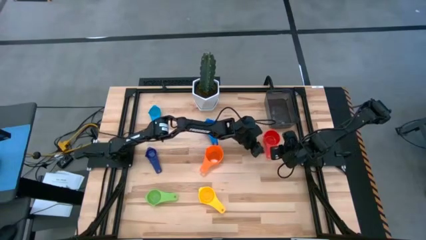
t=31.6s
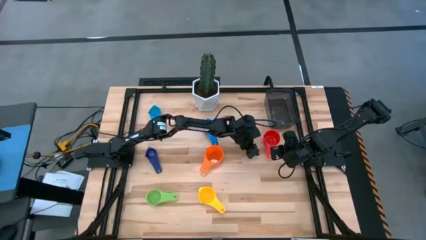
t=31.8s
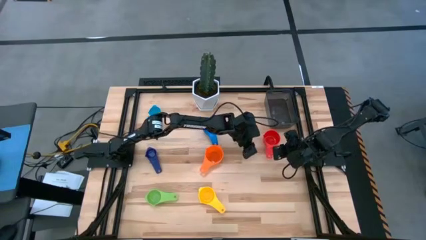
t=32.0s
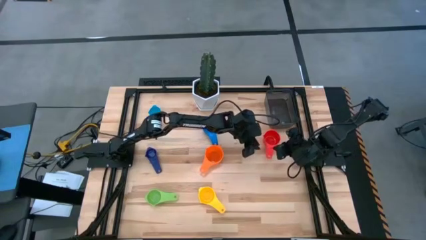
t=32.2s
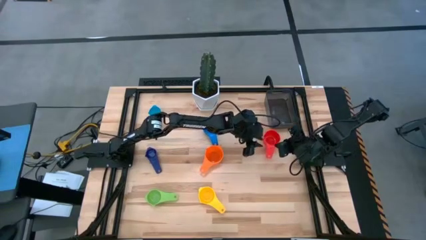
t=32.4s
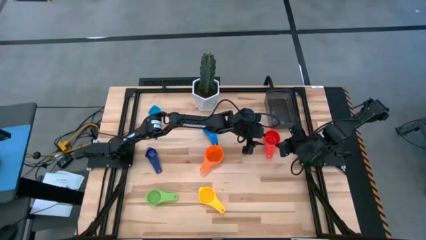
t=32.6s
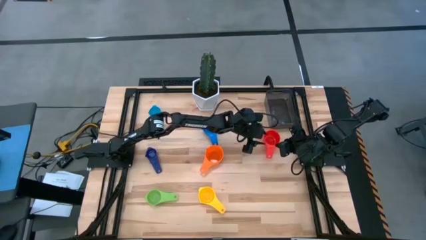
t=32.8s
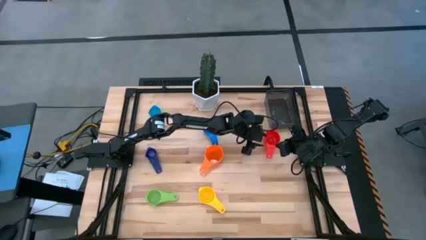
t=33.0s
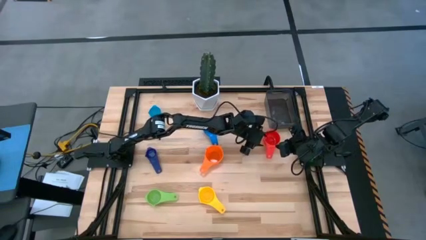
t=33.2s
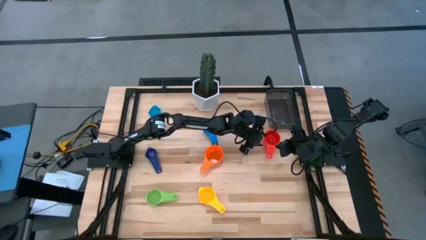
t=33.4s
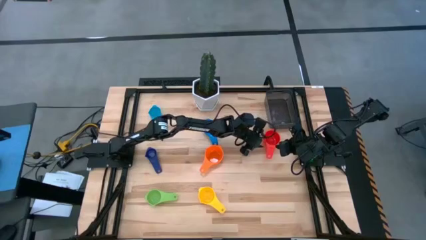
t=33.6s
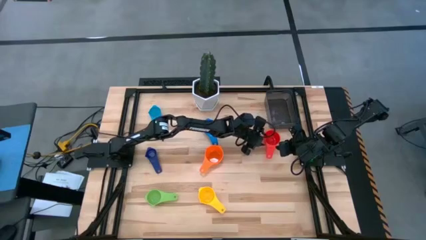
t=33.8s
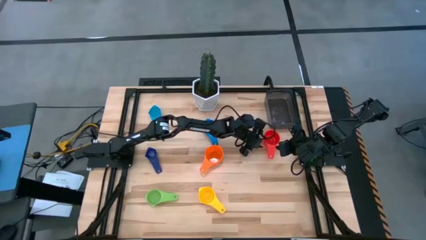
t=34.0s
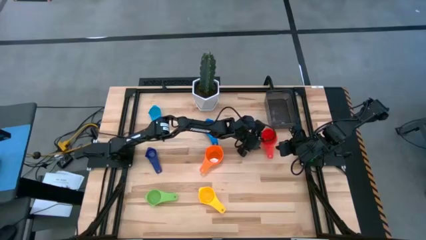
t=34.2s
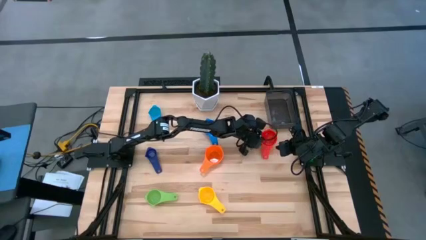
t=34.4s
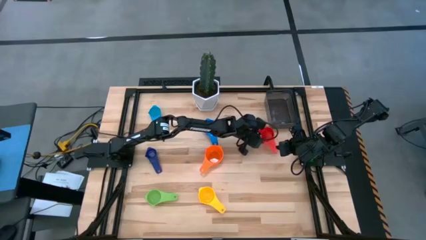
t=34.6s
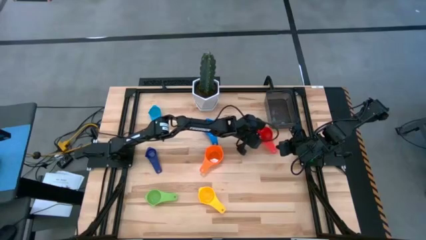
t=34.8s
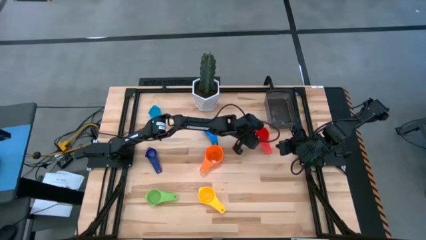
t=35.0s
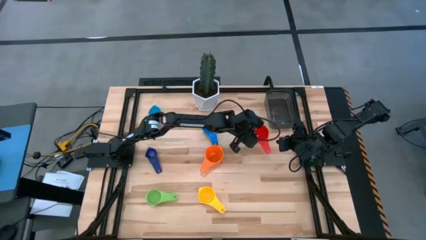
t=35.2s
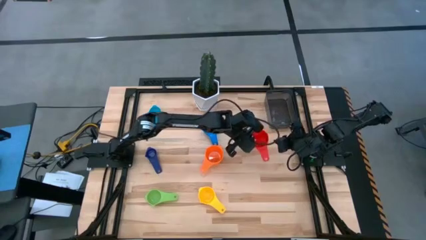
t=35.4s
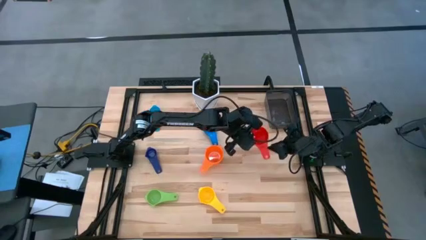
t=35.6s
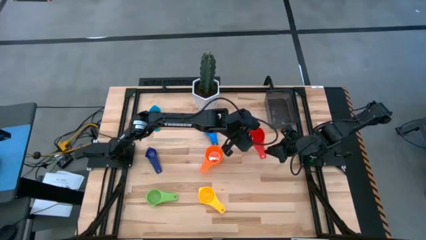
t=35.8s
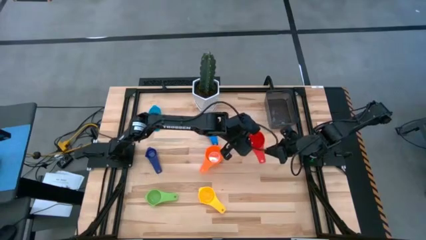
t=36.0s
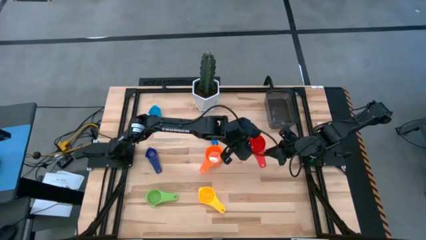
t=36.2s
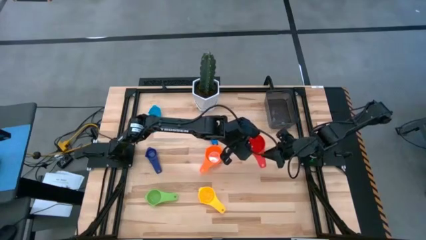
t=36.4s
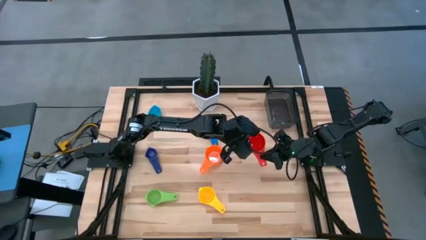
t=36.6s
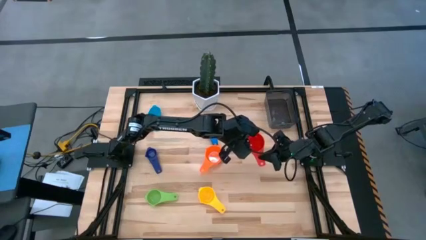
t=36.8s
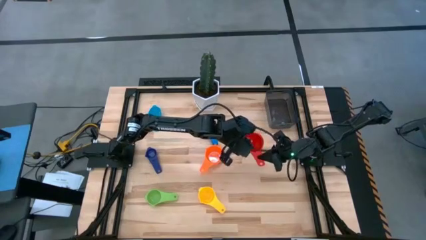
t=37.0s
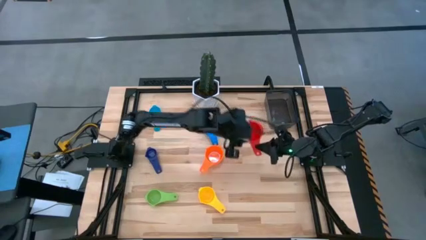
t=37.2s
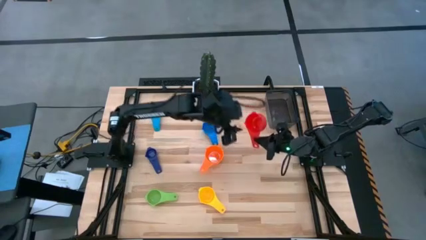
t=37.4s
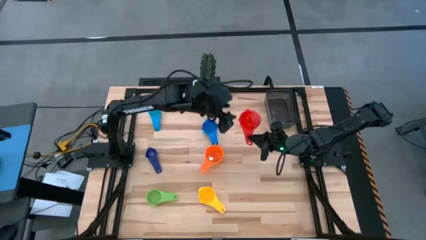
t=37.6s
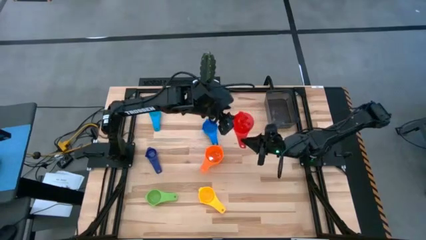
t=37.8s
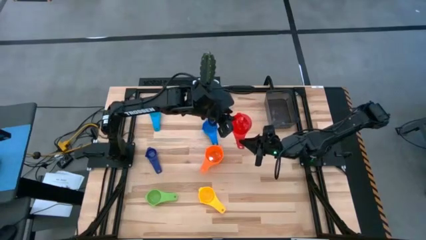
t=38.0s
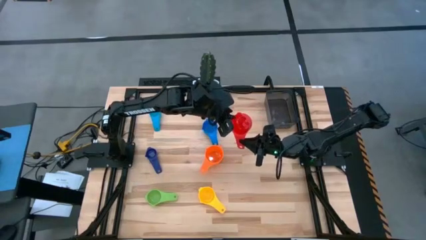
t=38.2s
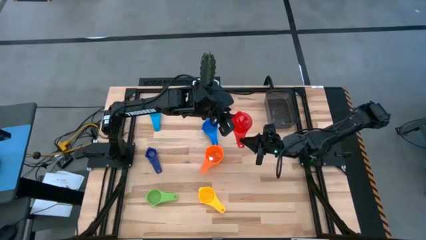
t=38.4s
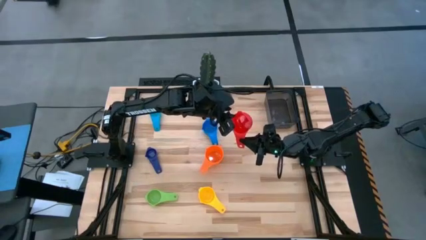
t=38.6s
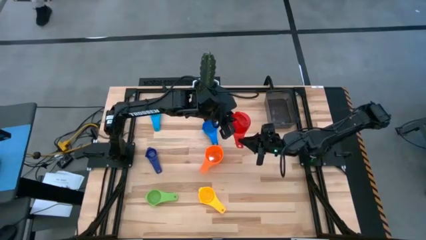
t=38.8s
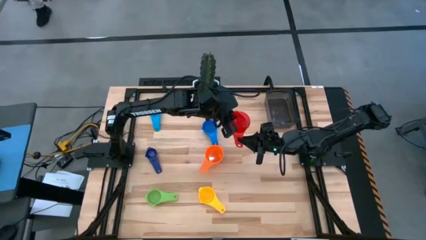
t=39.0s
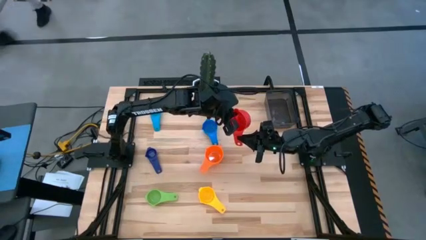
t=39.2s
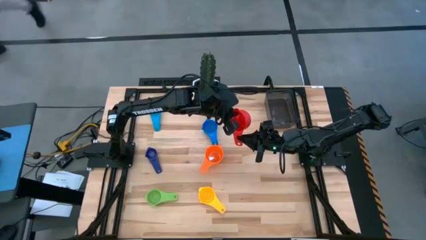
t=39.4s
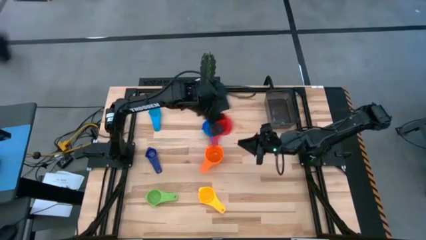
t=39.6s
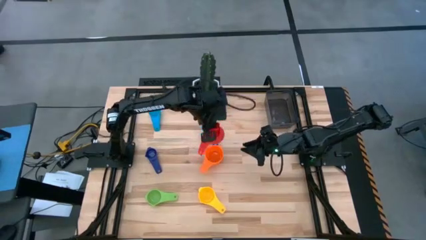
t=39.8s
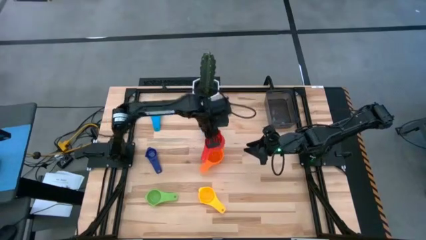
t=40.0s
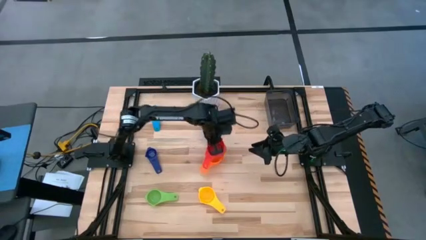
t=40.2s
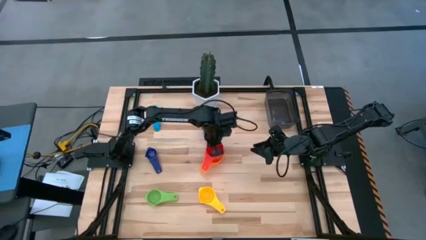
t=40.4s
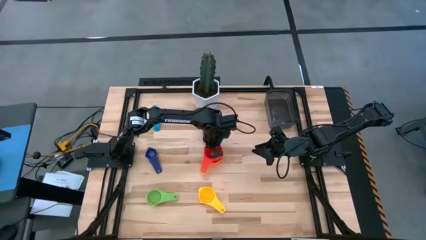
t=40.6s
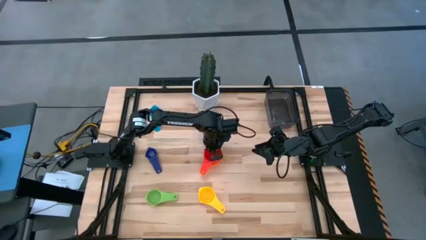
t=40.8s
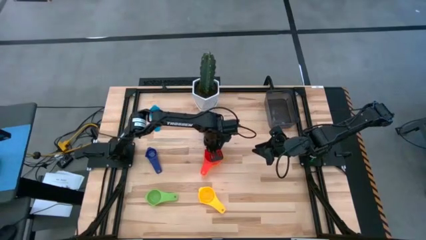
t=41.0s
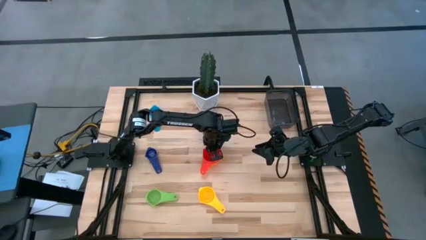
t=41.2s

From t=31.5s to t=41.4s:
Task: Nest measuring cups in basket
Stack the red measuring cup on top of the orange measuring cup

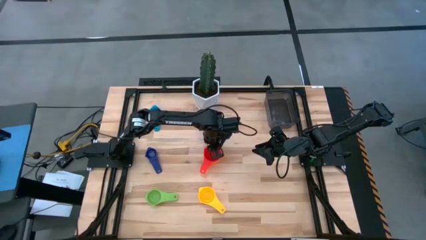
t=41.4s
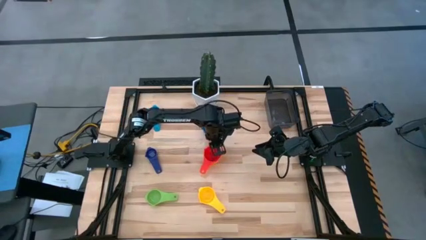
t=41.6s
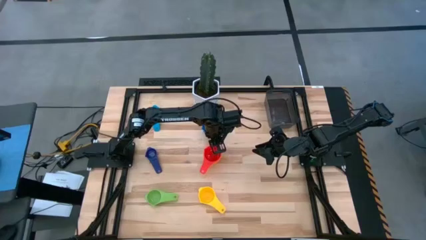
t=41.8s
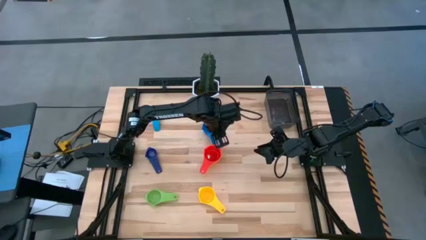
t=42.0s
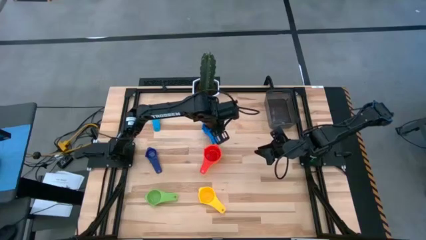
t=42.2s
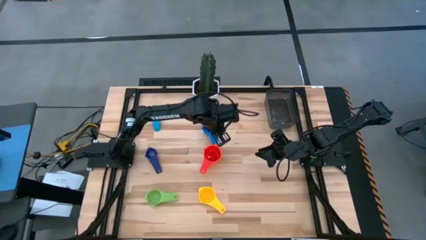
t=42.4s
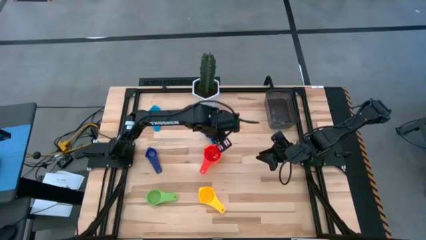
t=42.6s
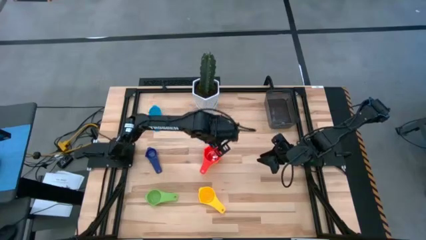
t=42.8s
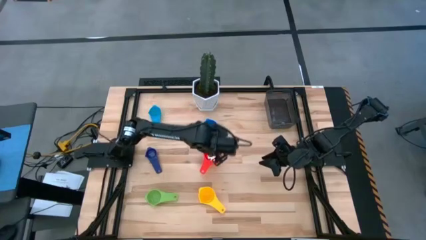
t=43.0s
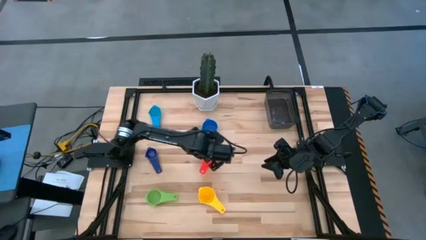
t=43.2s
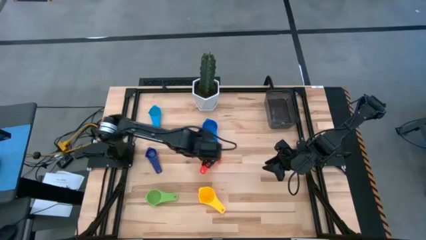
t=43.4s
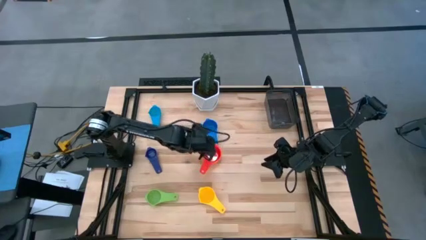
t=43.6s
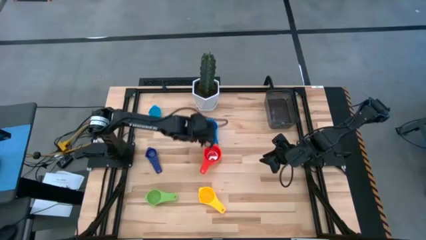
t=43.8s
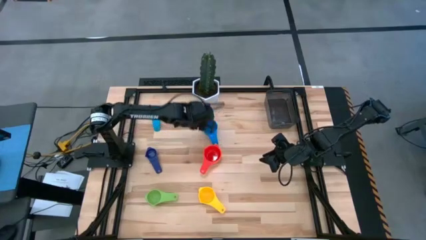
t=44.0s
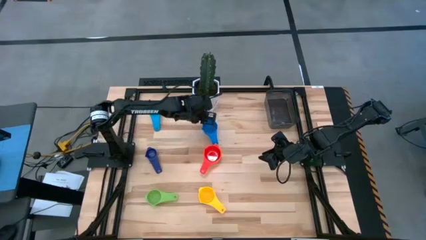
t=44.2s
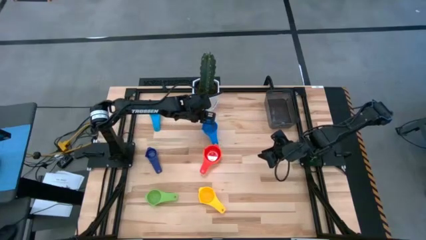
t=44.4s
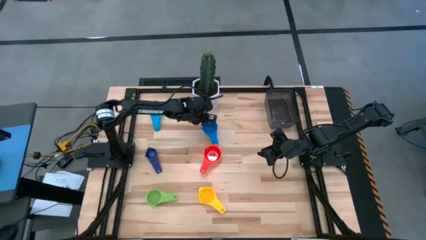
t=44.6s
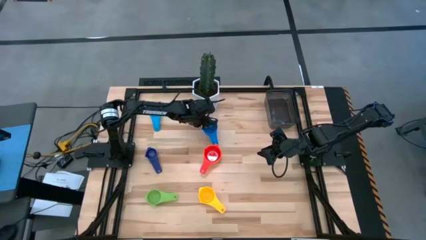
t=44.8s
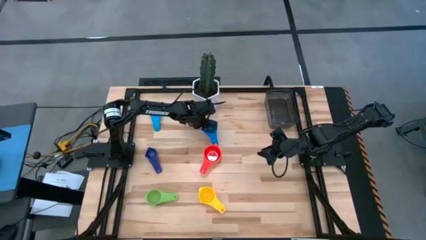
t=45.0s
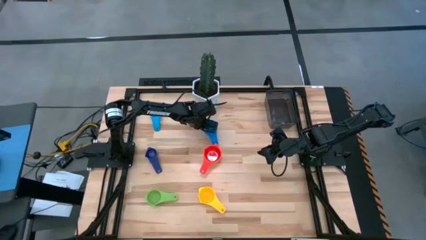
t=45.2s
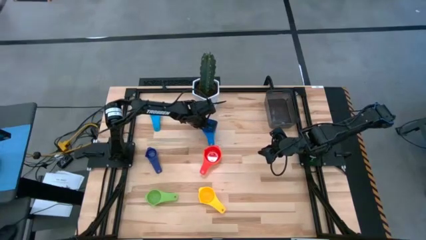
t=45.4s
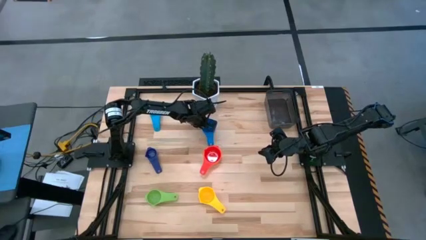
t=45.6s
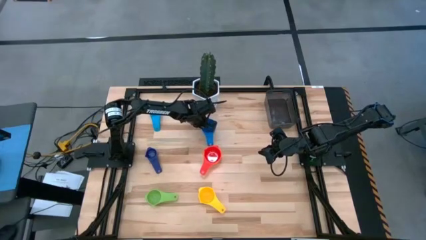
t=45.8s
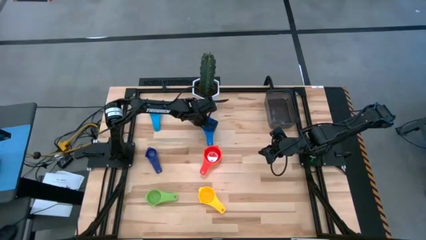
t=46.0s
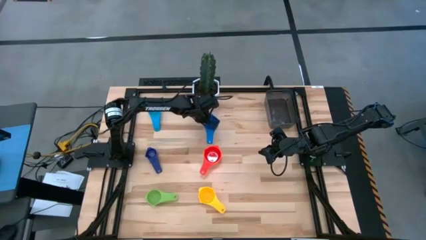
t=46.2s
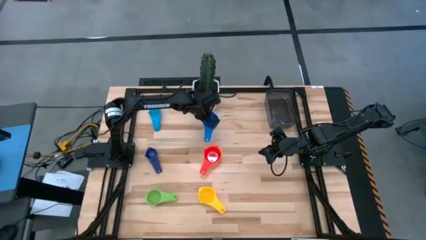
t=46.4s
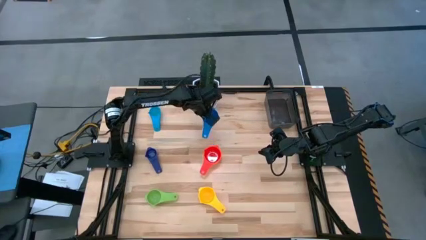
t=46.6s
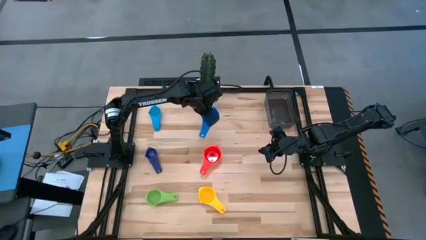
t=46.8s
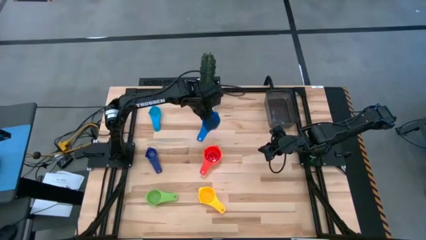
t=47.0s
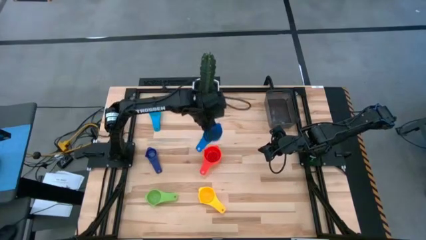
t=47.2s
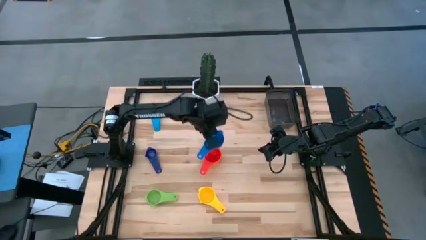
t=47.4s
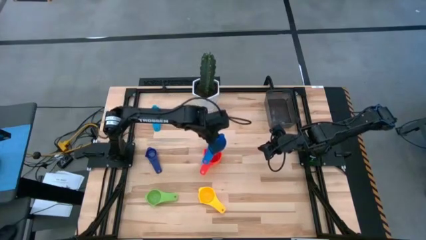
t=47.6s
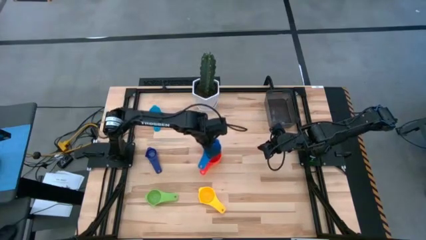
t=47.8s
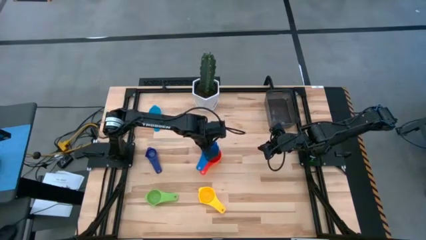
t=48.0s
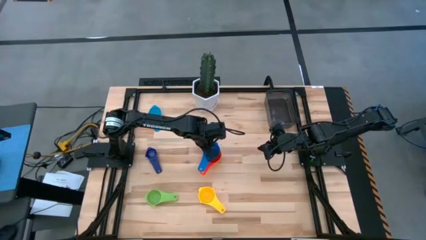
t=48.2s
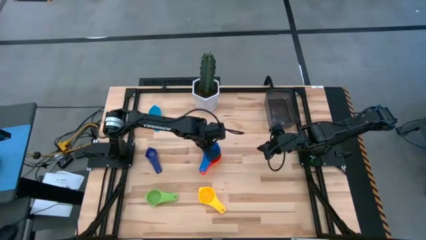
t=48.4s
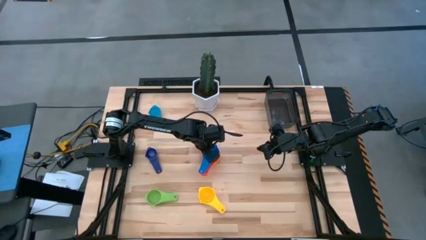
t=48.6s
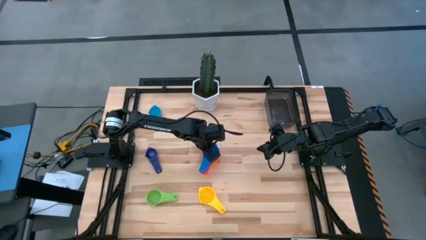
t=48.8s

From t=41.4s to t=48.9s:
Stack the blue measuring cup on top of the red measuring cup
